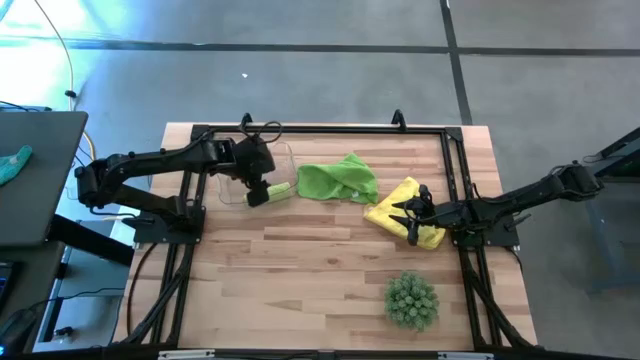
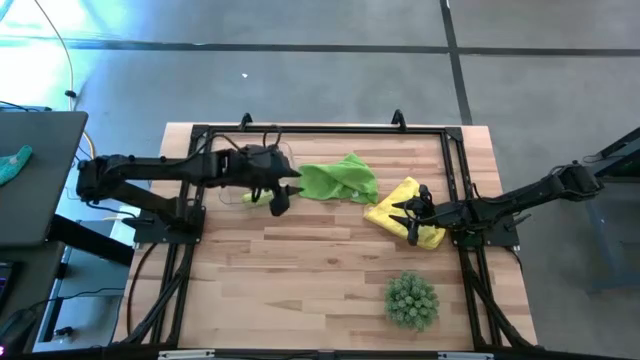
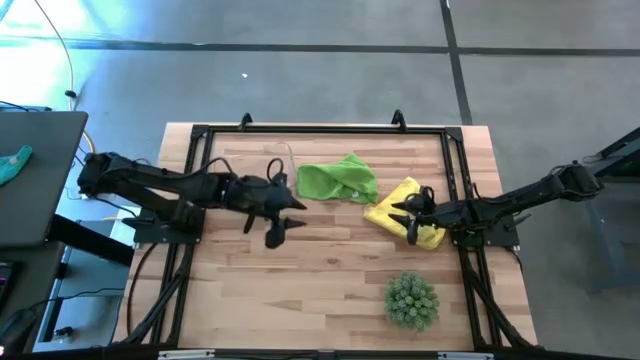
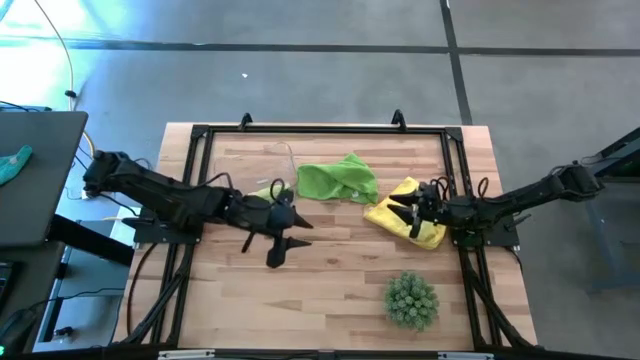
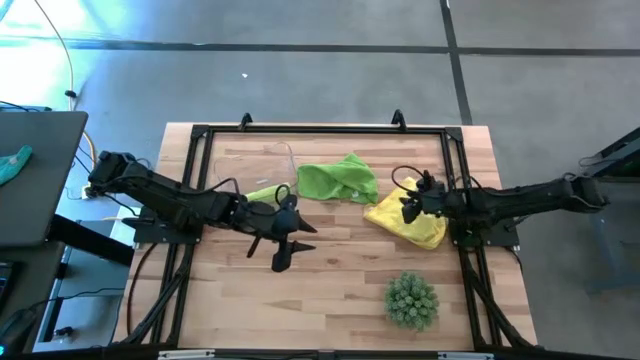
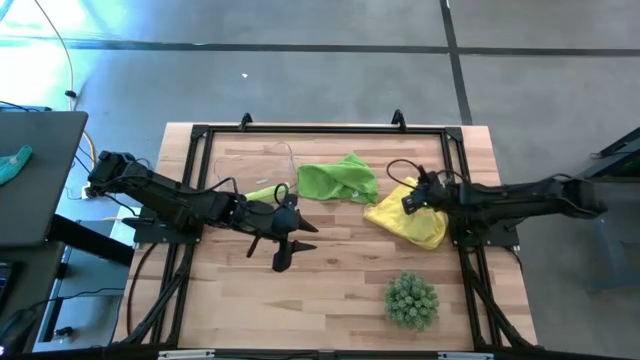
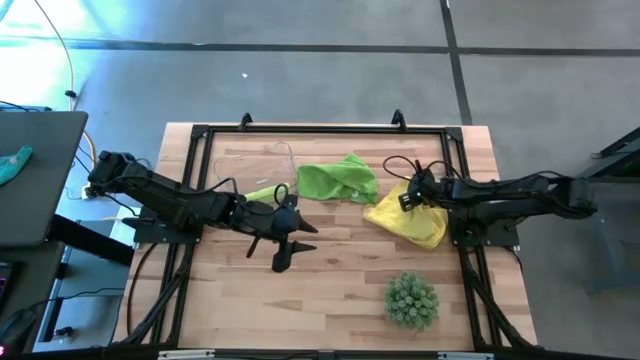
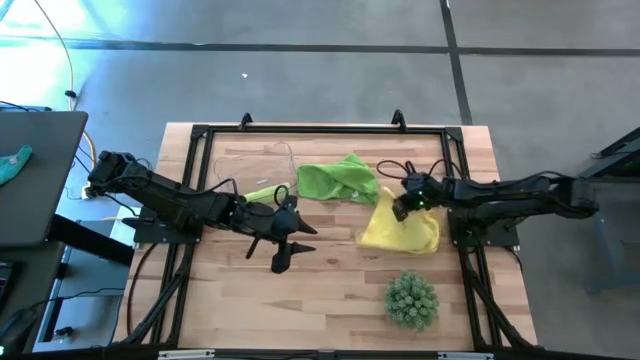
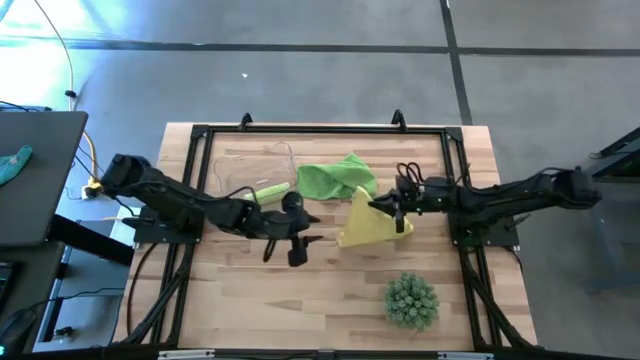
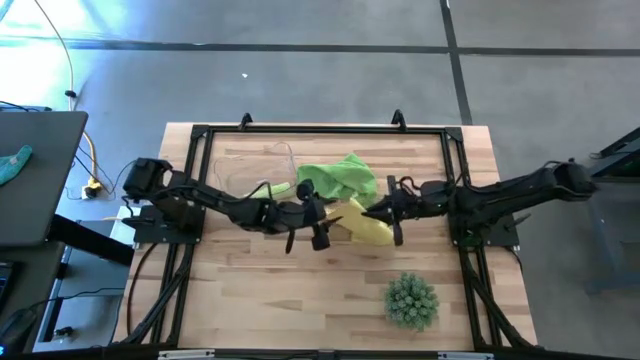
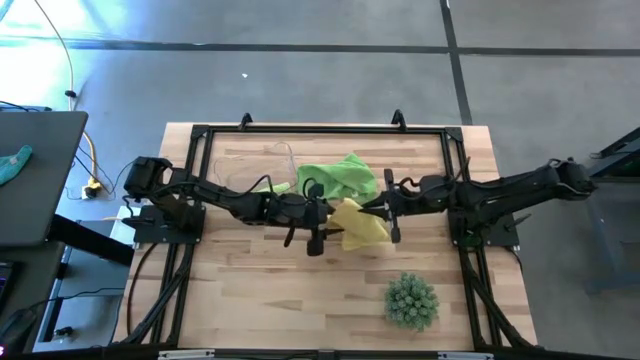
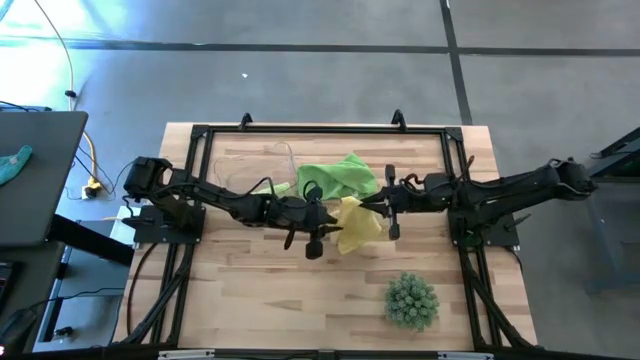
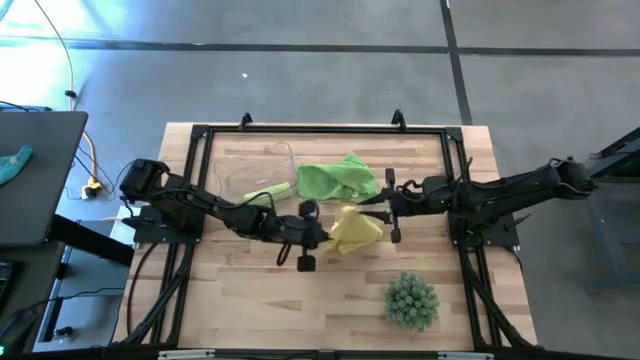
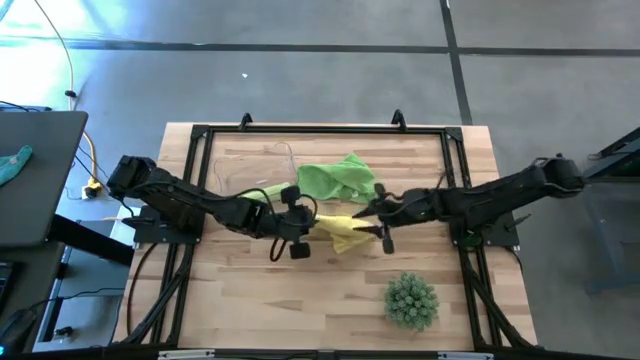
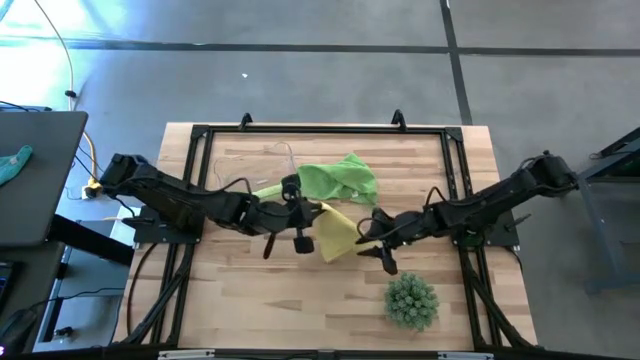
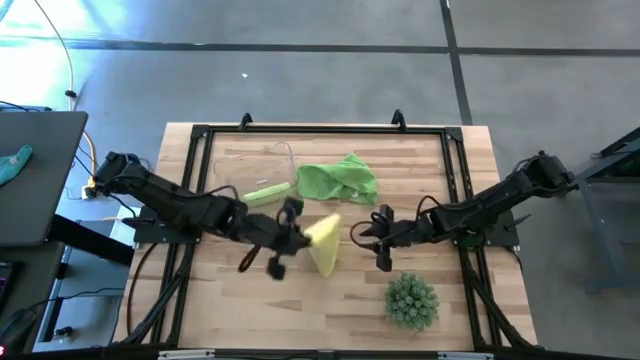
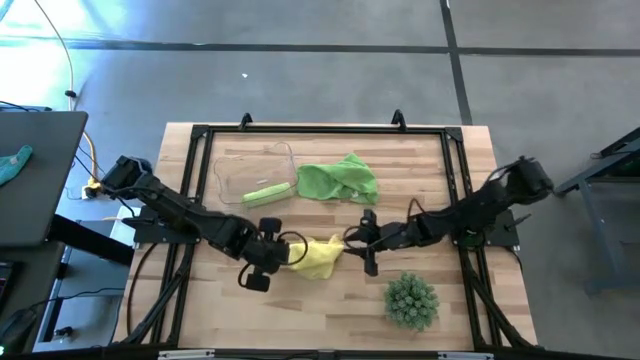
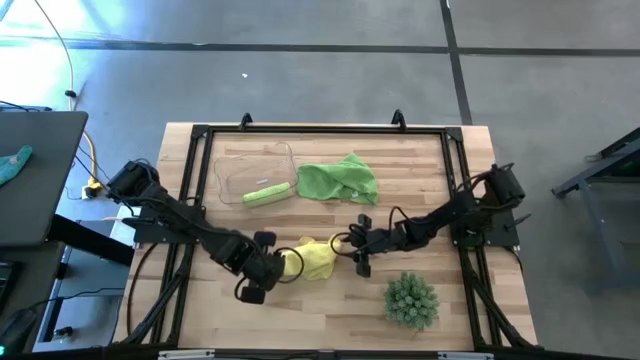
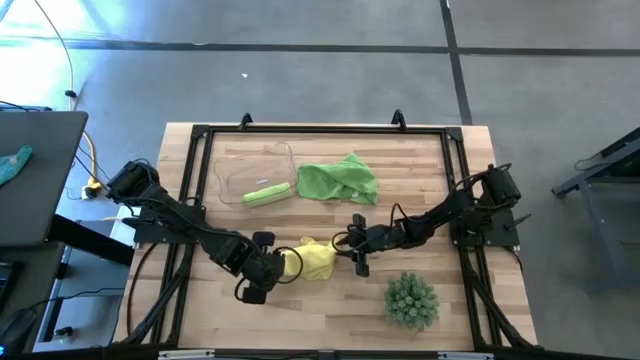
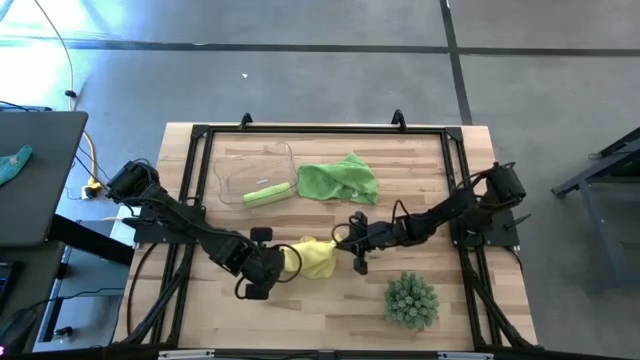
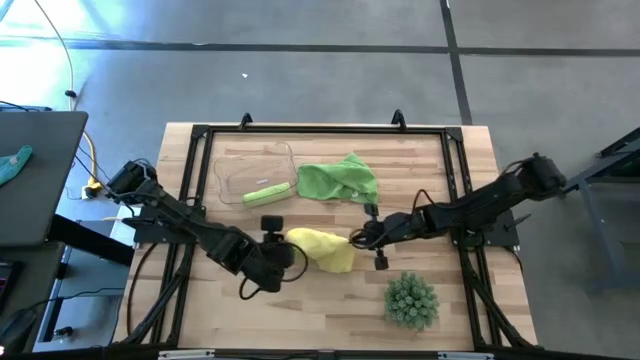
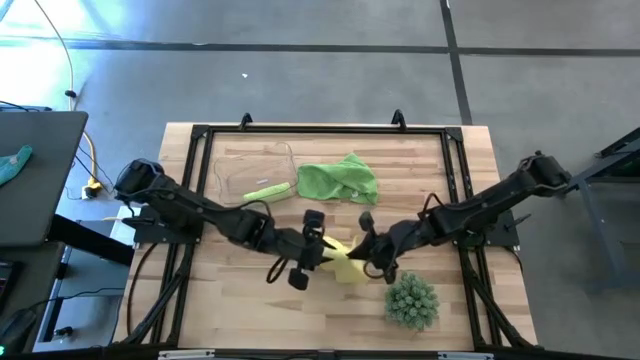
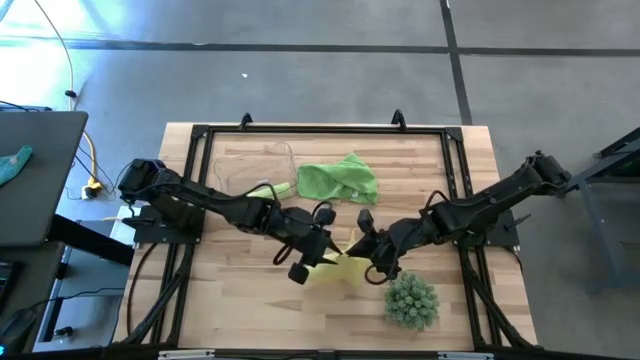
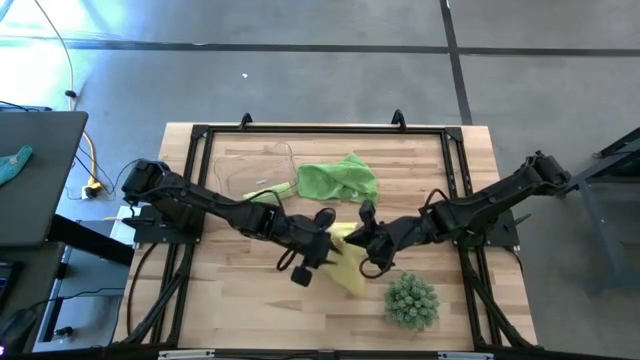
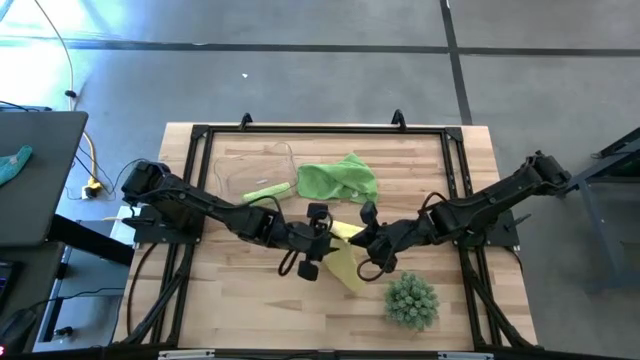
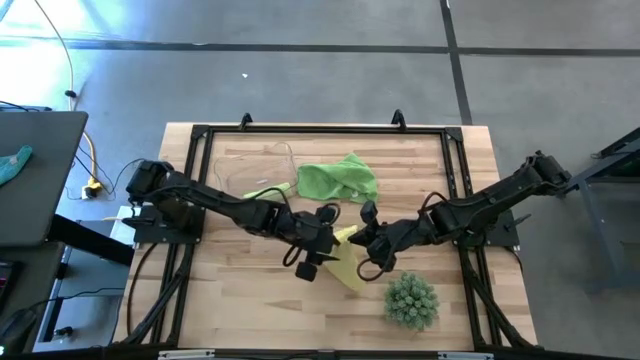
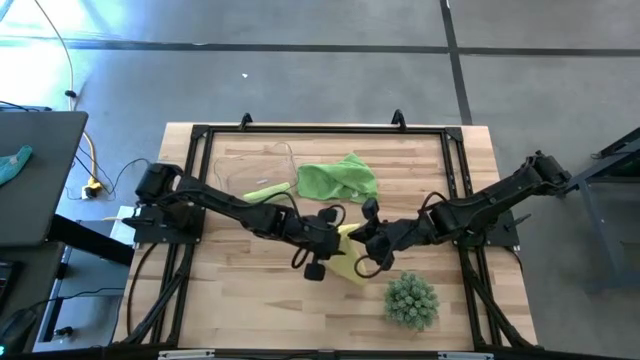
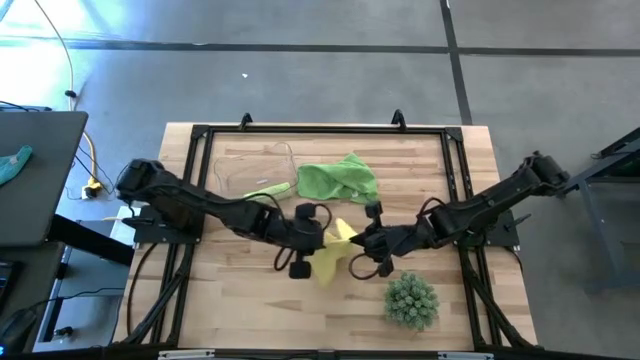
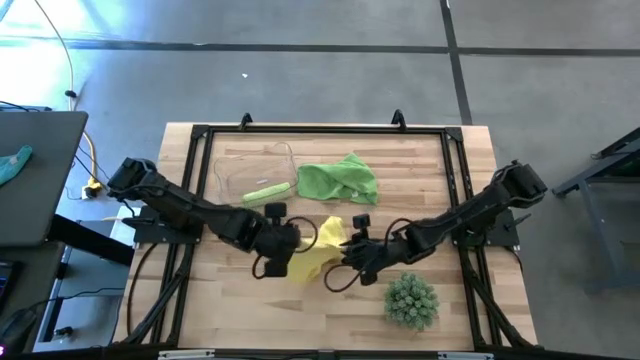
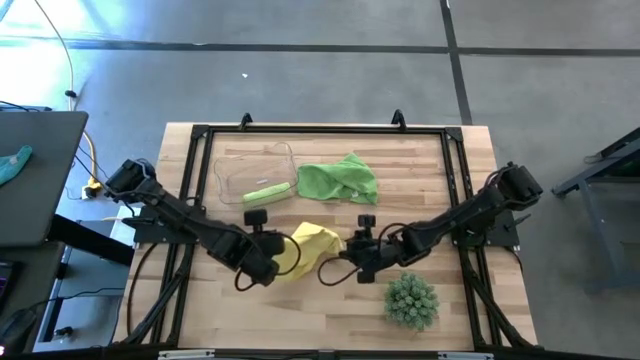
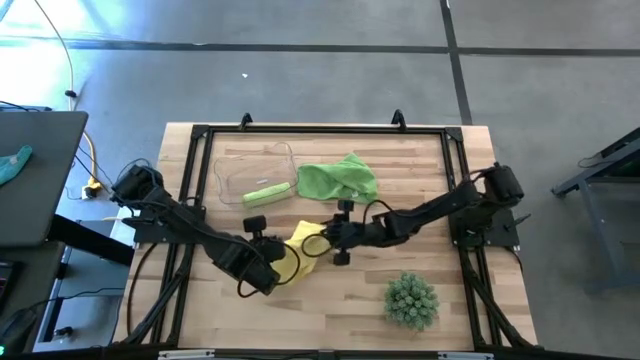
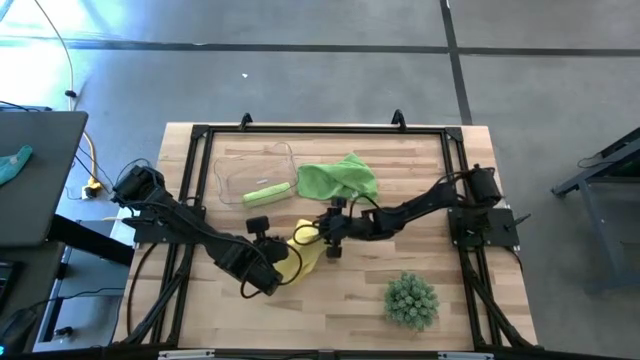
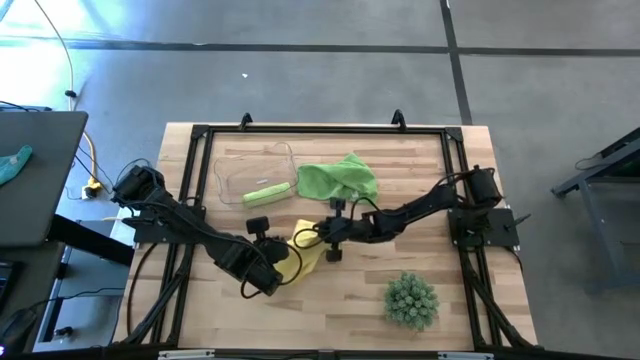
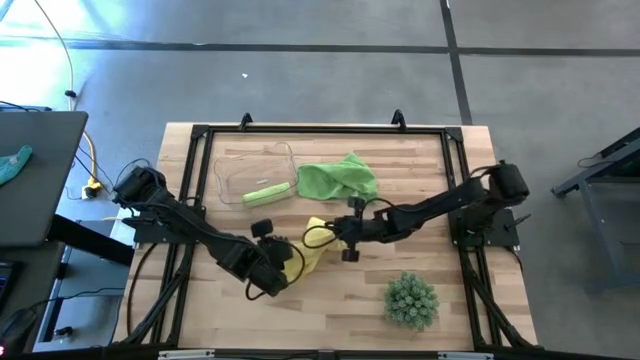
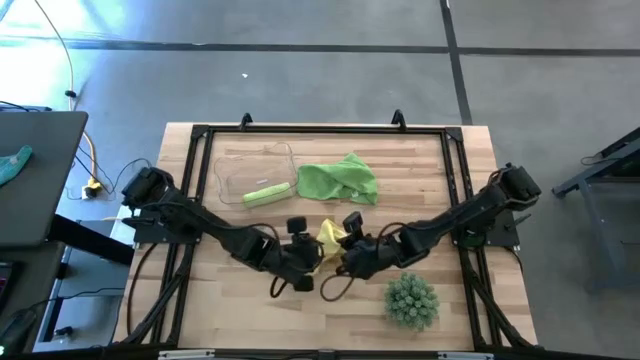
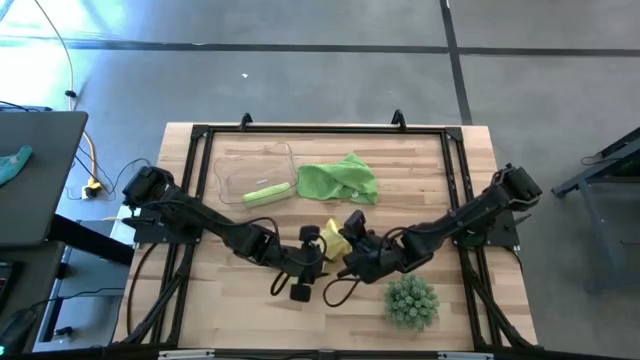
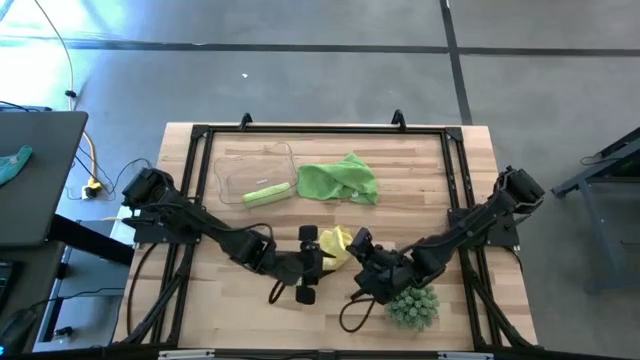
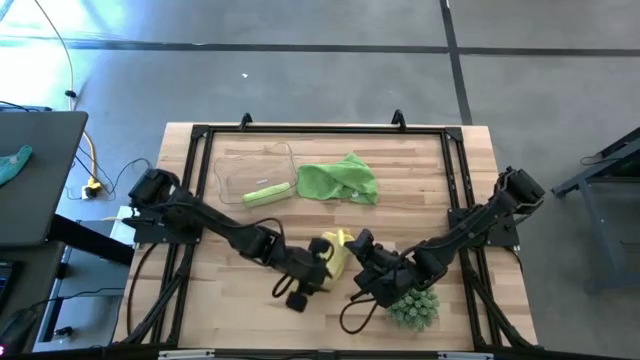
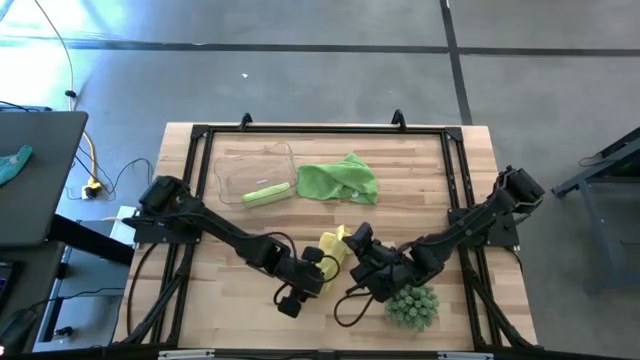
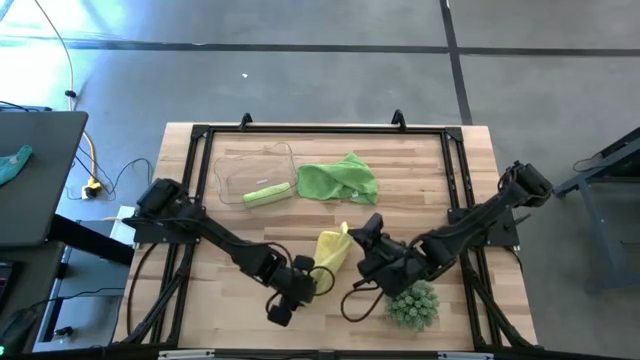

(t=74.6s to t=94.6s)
Task: Roll microfiber towels into tight, uniform cylinder then place into a basket
Fold the yellow towel

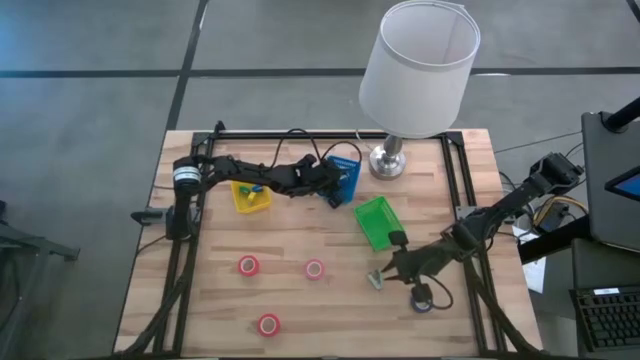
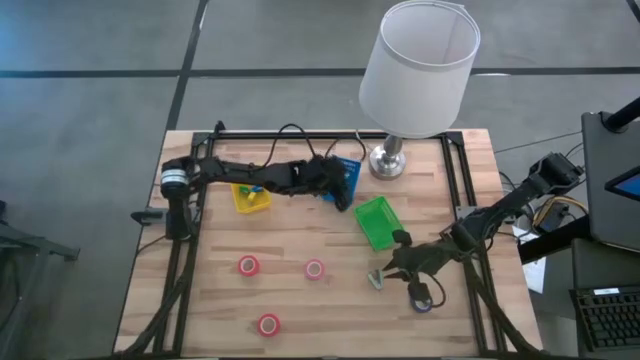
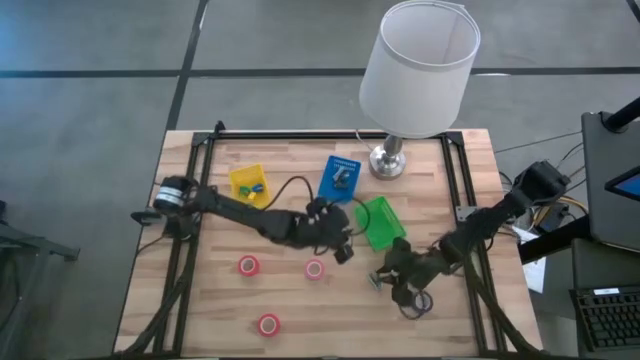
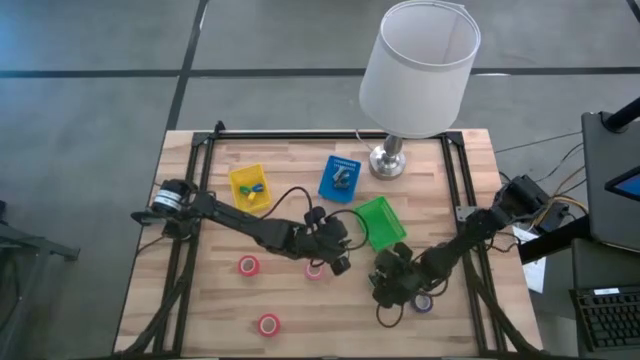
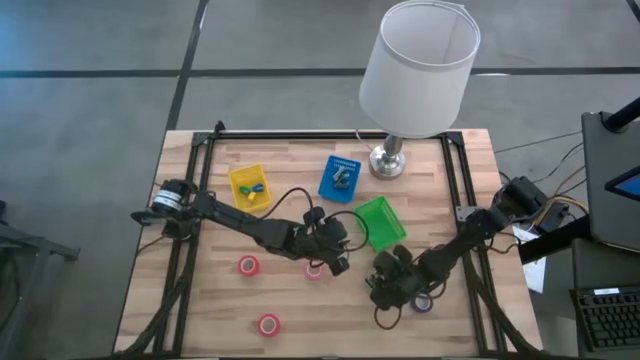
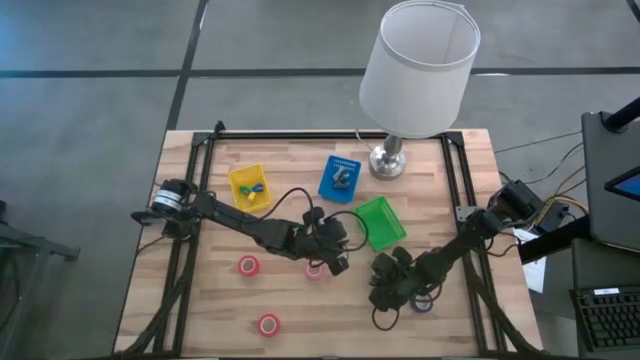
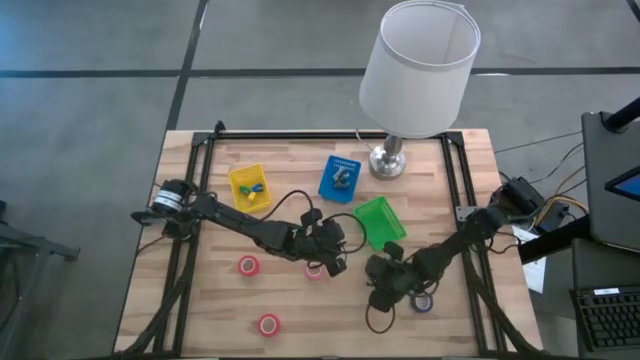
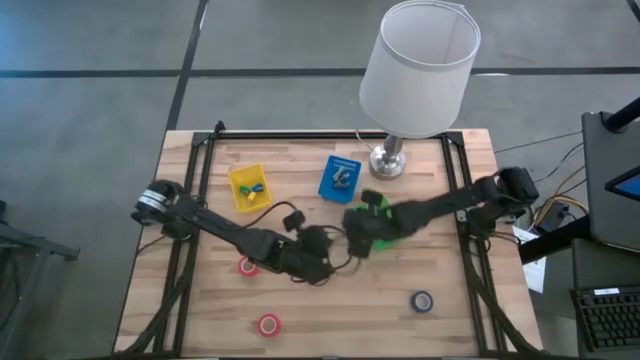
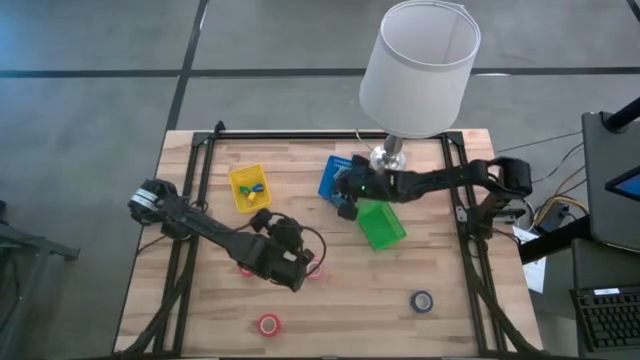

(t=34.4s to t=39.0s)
Task: Pick and place Stapler, Stapler remover, tape
Put the light blue staple remover into the blue basket
